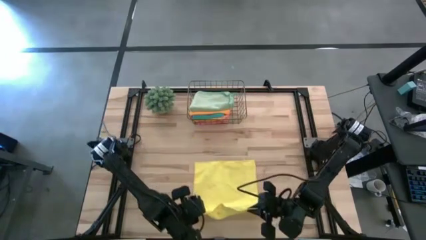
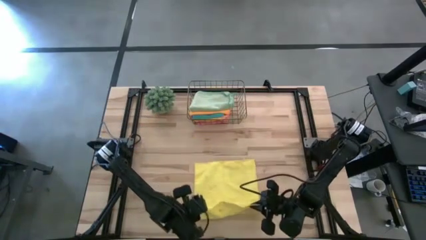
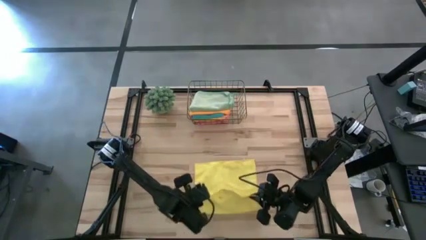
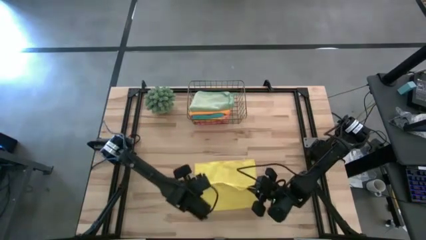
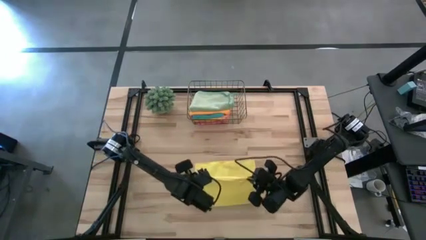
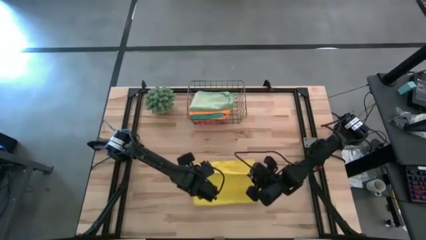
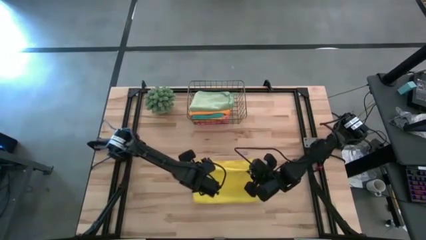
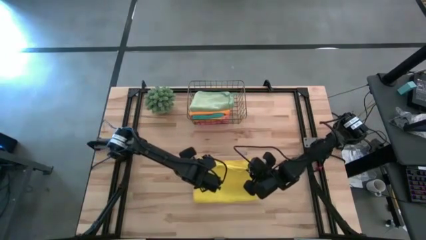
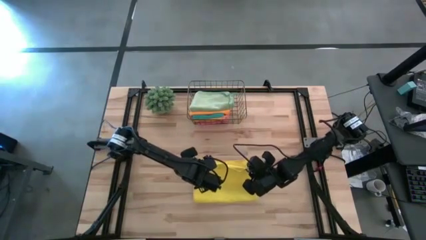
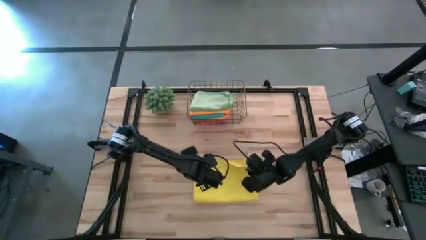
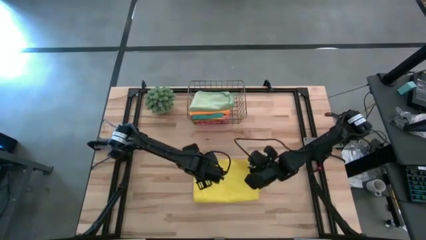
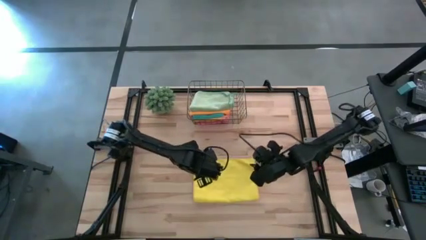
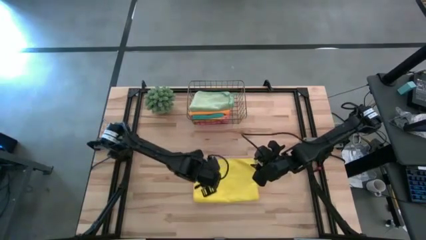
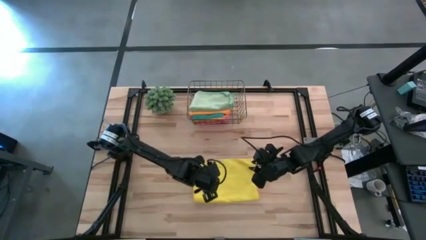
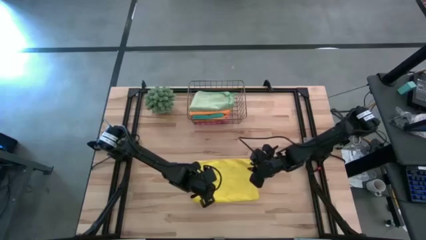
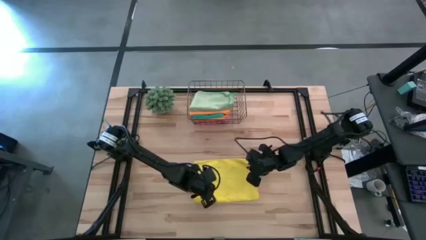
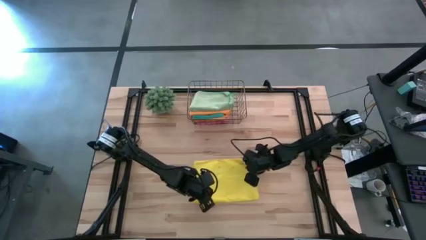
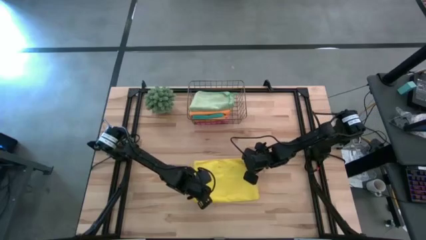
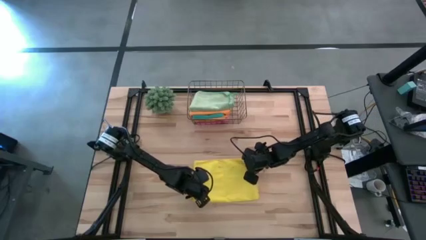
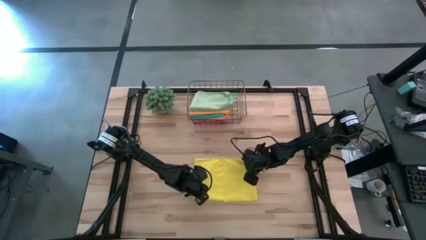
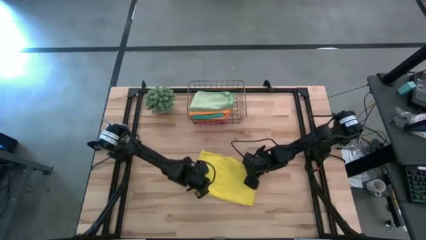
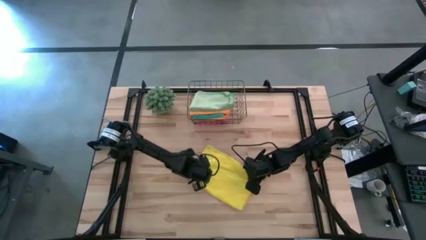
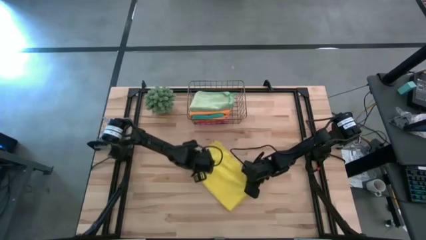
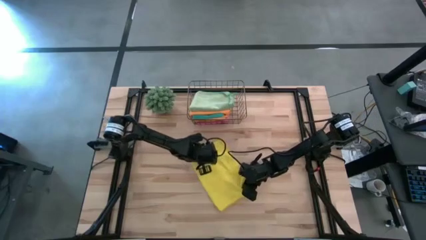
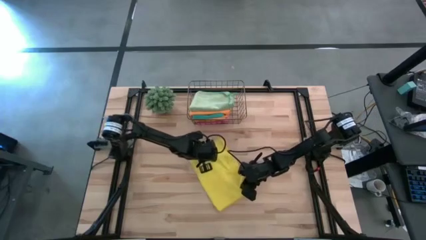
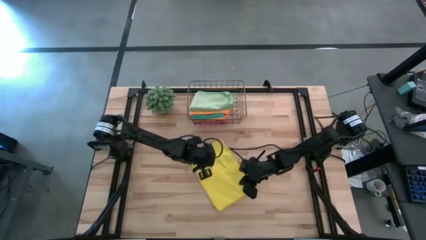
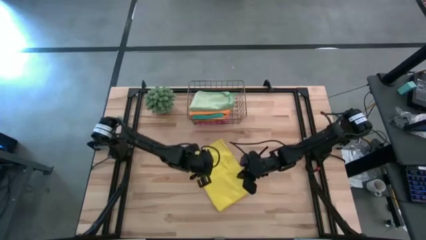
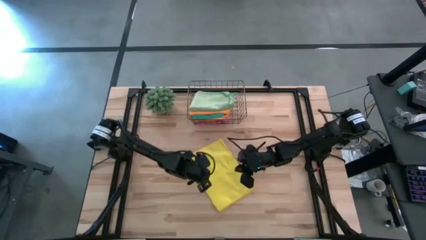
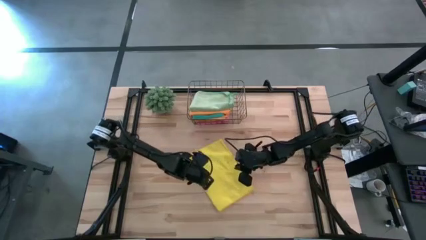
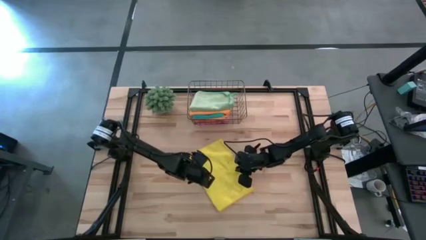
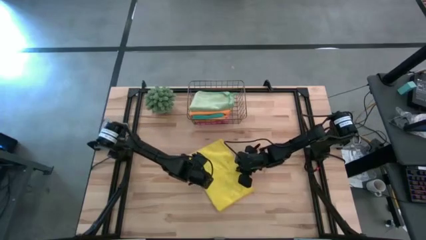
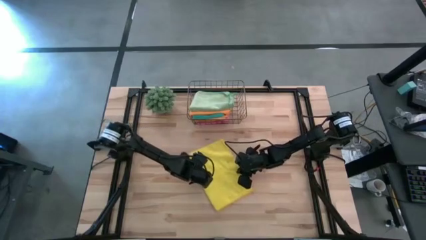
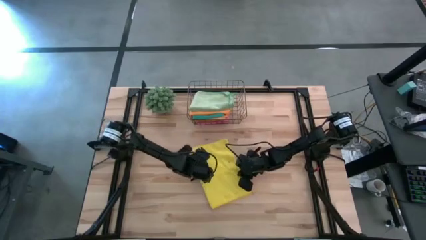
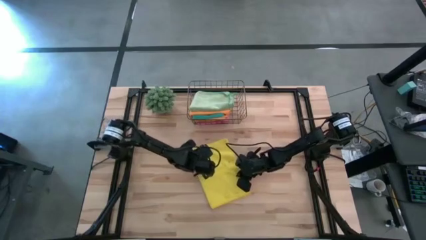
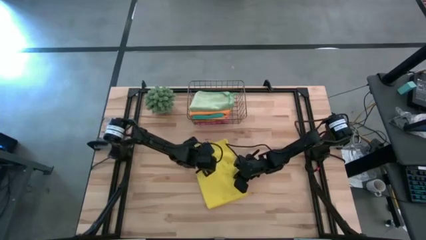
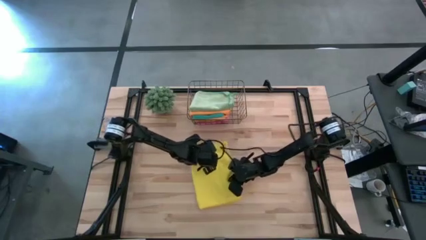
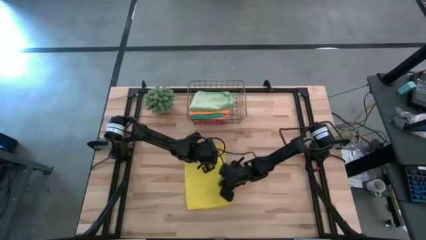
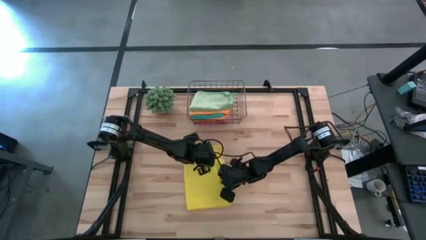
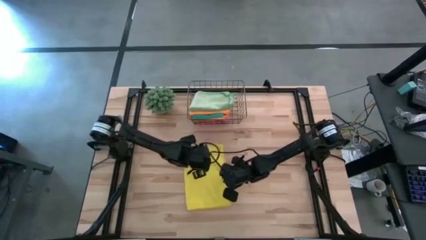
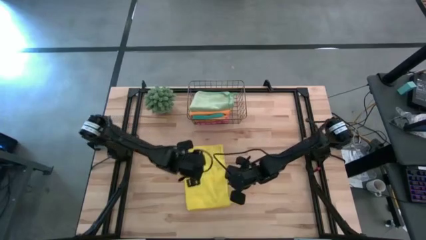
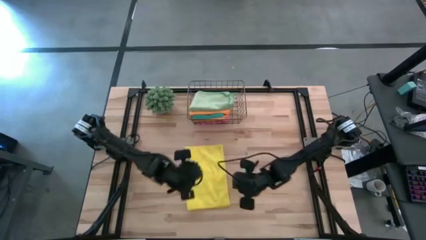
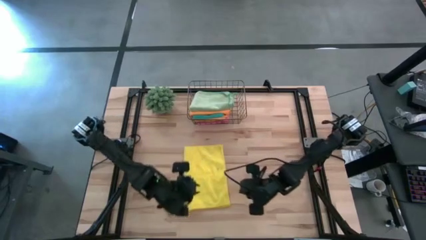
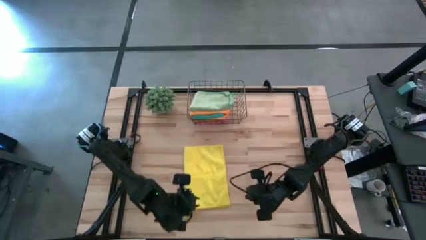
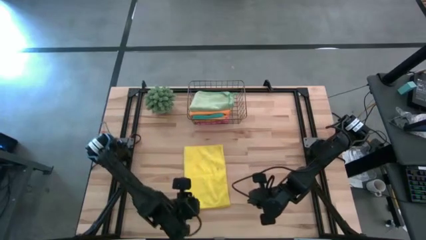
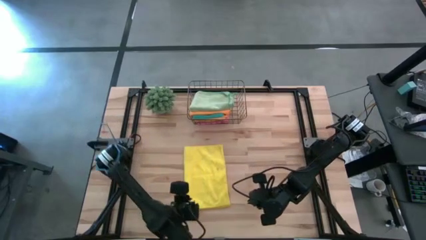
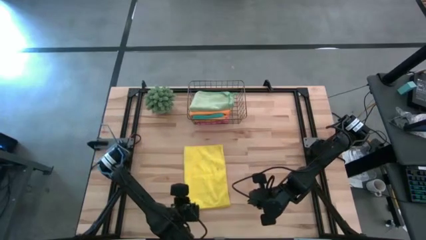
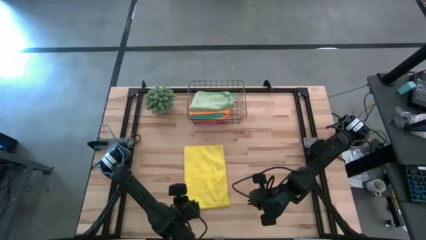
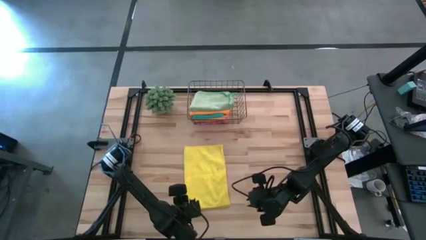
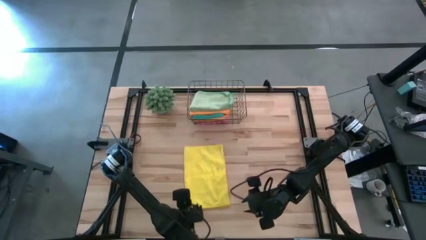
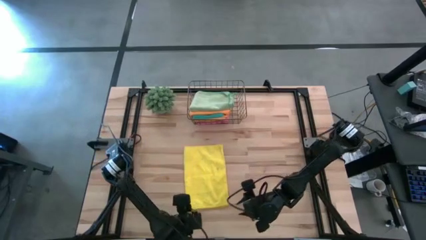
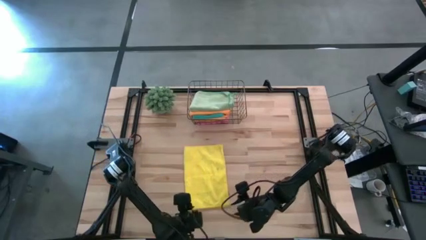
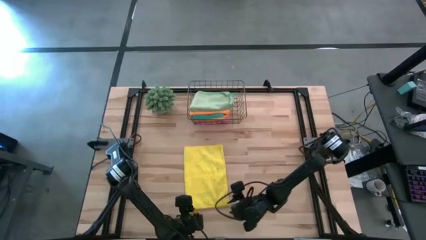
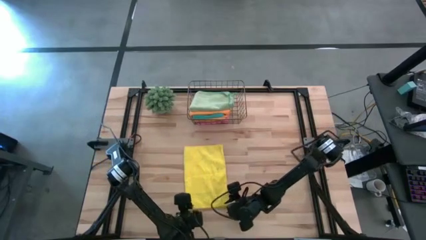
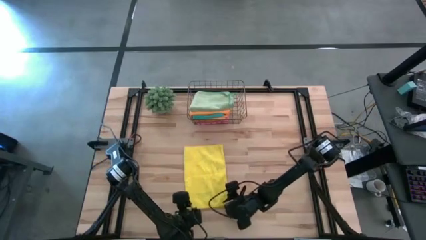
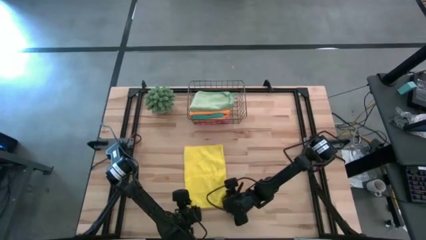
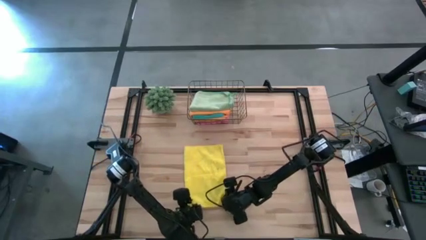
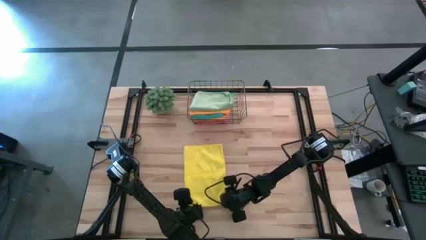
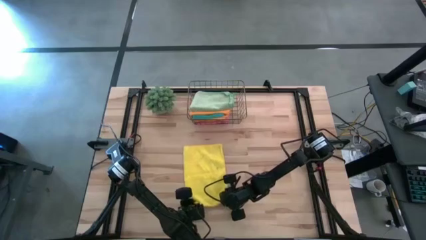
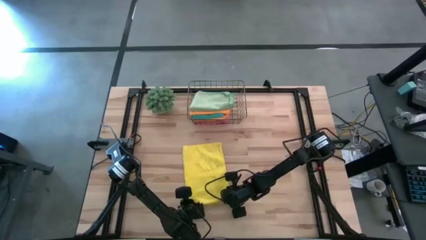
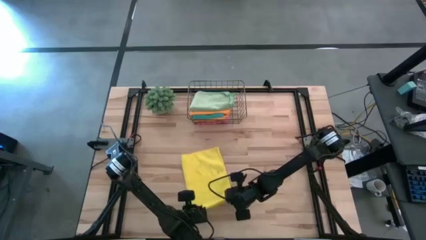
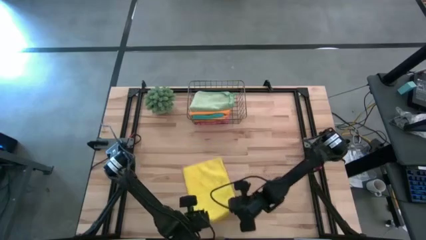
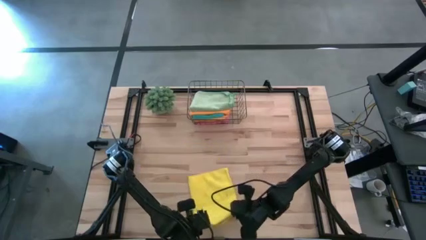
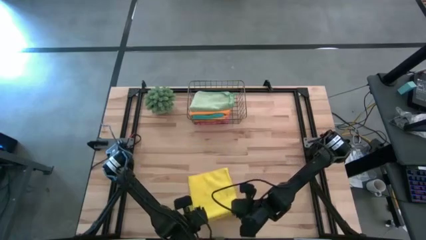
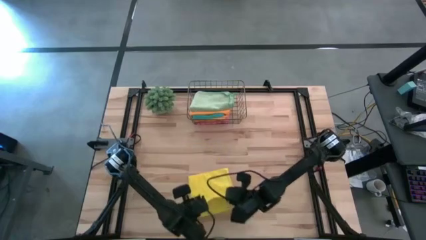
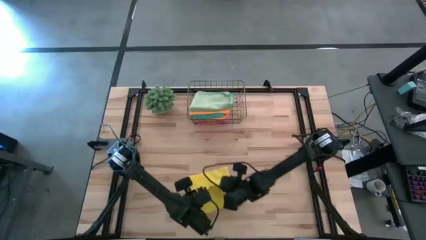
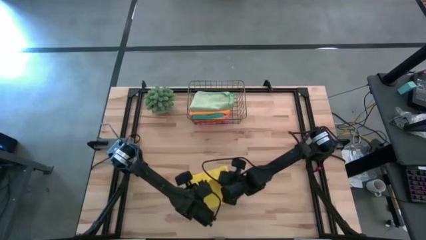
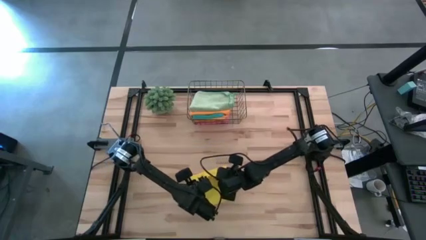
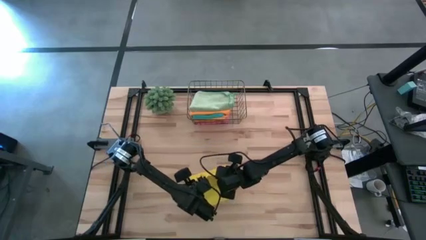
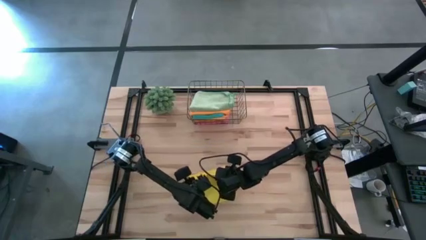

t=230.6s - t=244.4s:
Task: Fold microfiber towels
Fold the yellow microfiber towel
